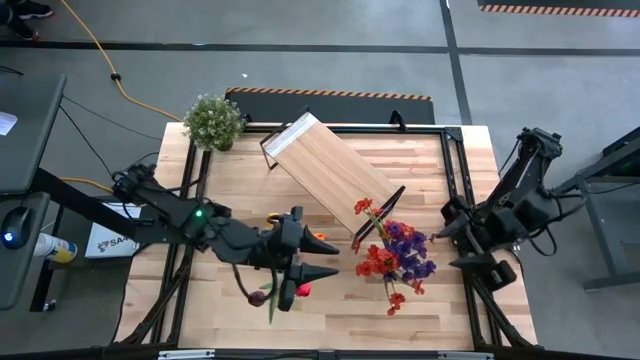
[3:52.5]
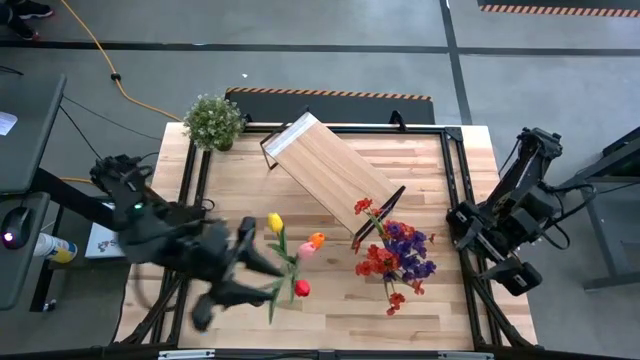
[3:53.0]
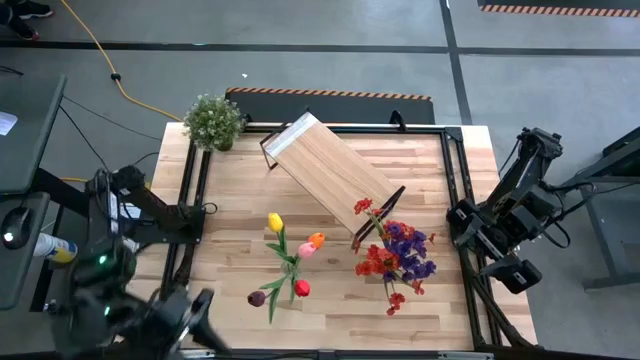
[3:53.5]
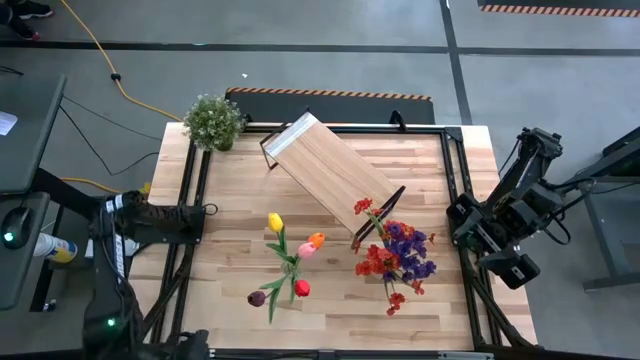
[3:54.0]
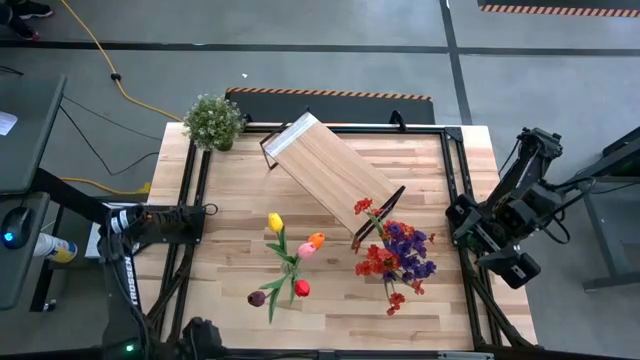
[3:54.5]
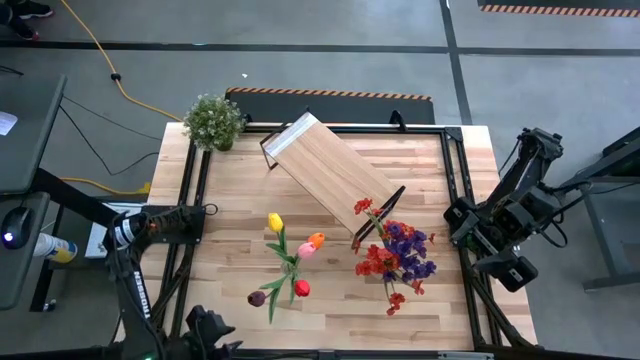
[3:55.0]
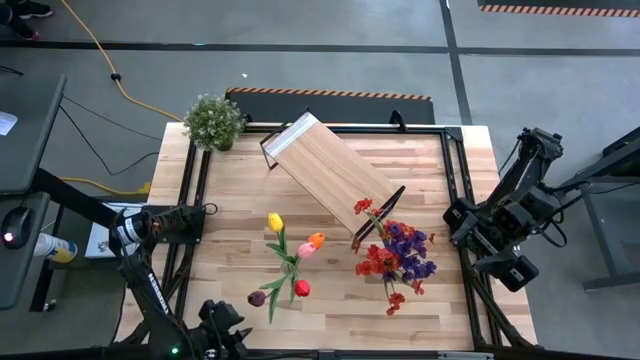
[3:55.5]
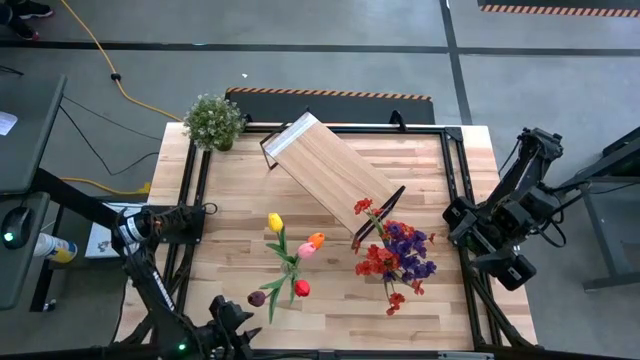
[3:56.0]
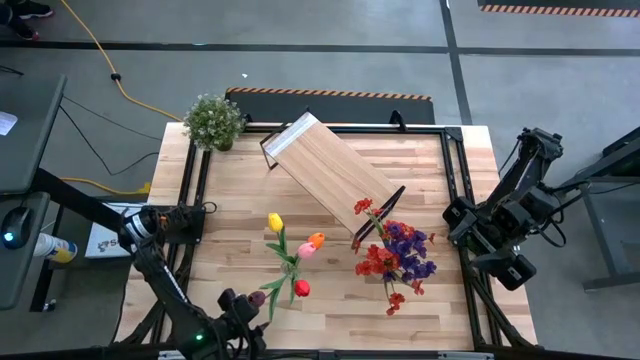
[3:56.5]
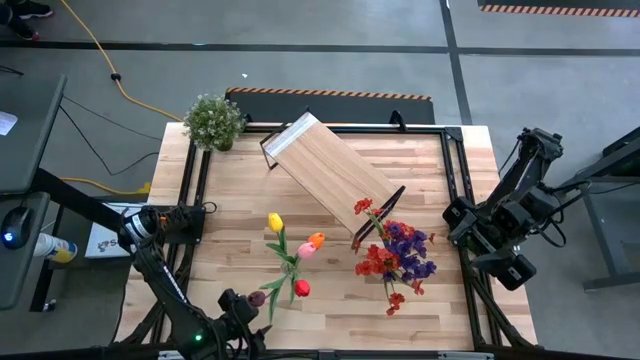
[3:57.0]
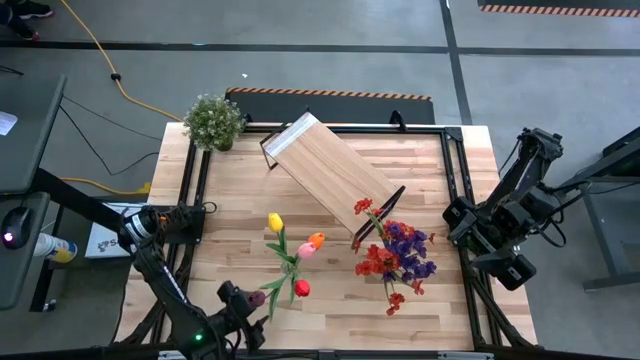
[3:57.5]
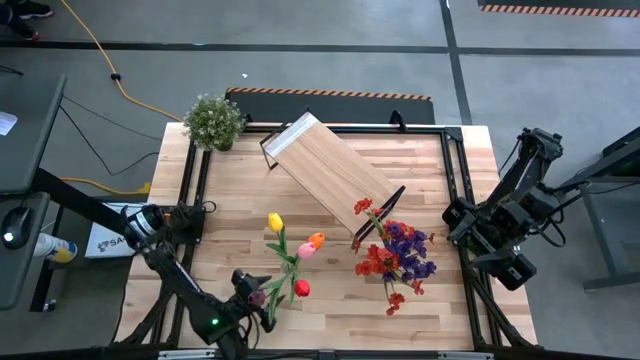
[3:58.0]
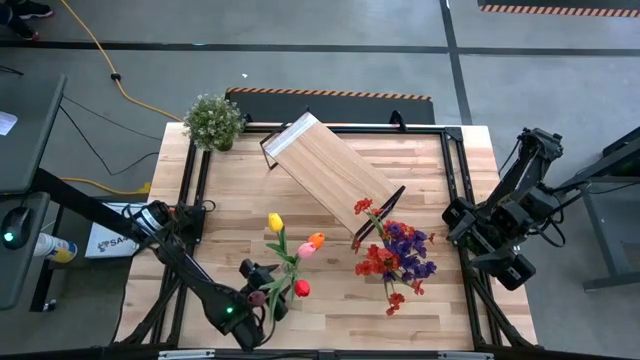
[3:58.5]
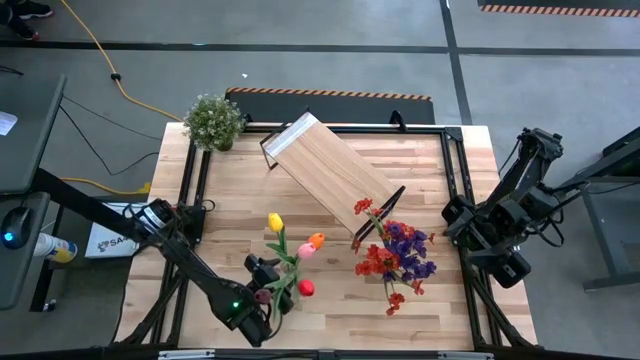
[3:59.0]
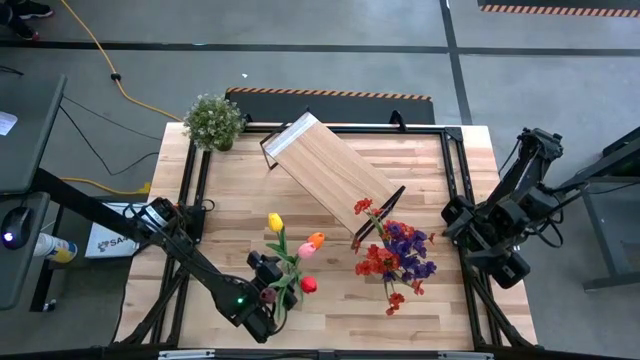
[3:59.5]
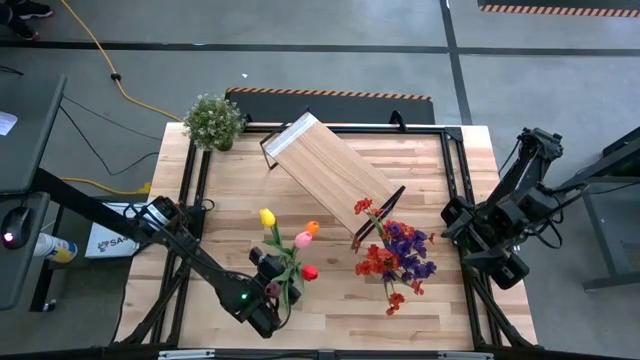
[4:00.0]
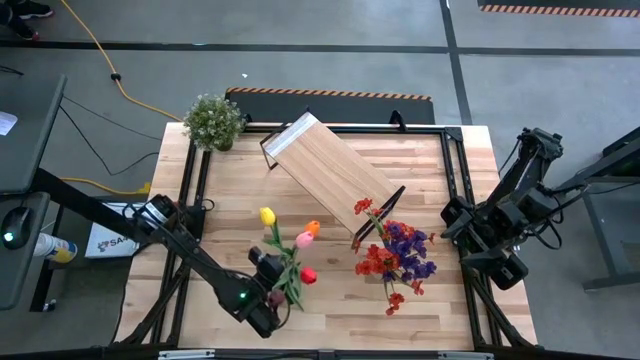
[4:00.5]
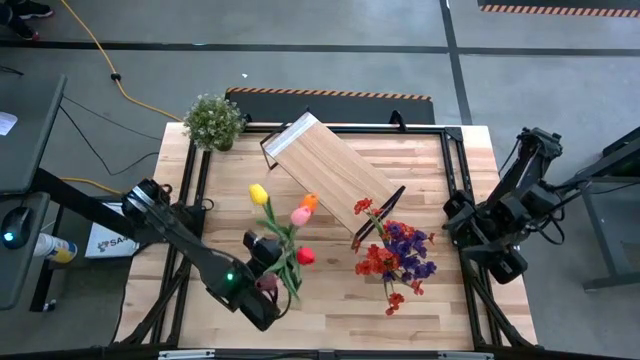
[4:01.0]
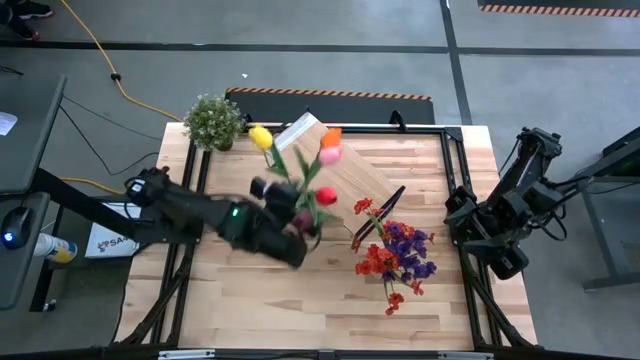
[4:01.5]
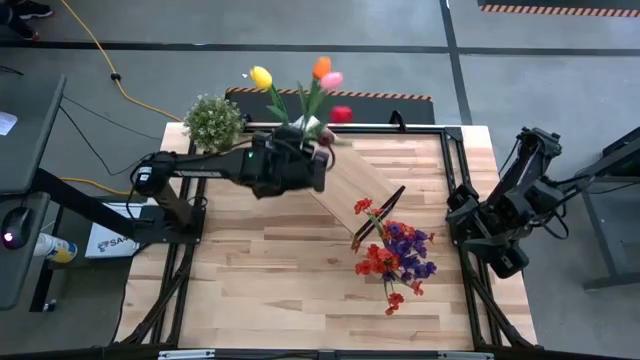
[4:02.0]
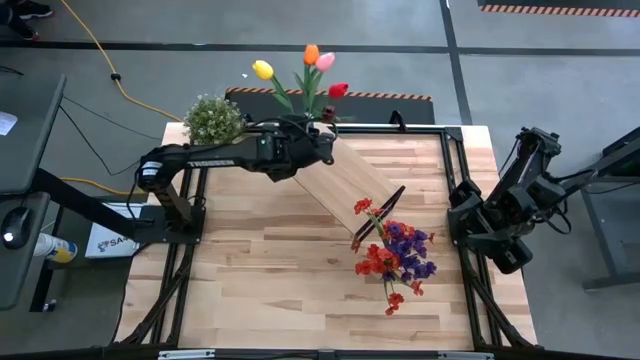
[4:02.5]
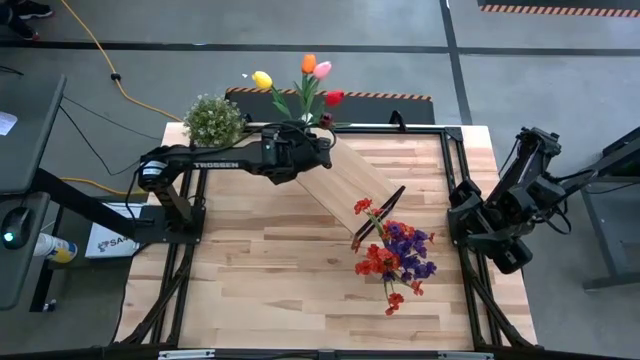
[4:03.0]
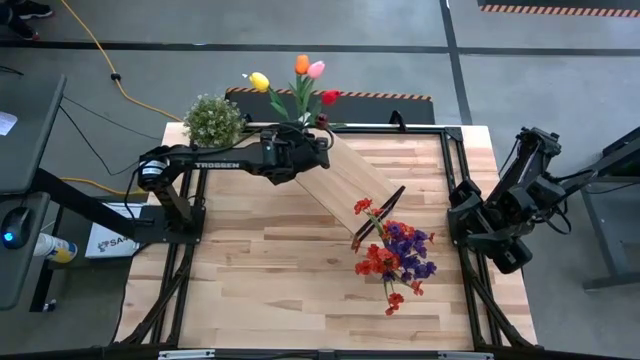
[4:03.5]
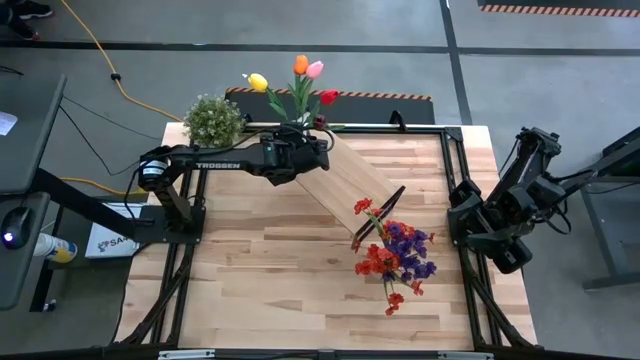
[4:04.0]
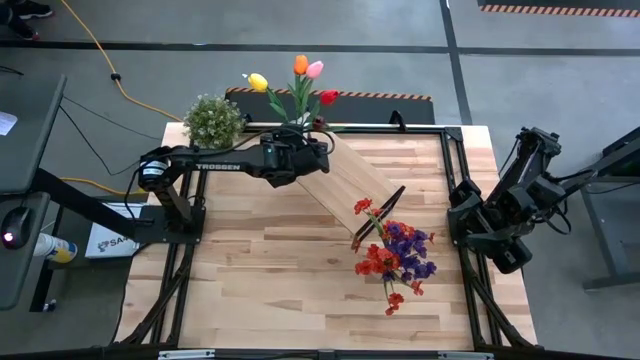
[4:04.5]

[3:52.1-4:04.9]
Task: Pick and place flowers into a vace then onto a shelf
Put the left transparent flower vase on the shelf

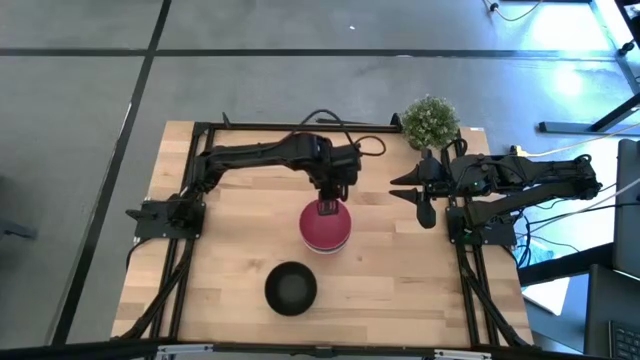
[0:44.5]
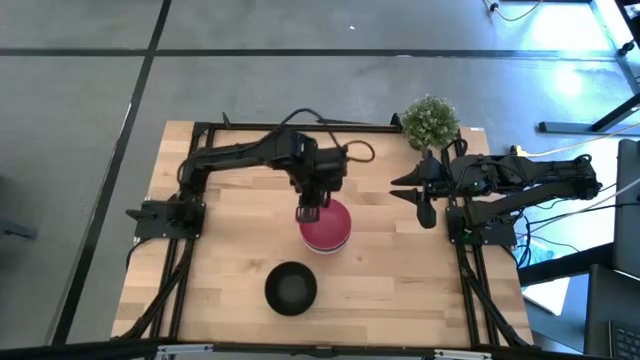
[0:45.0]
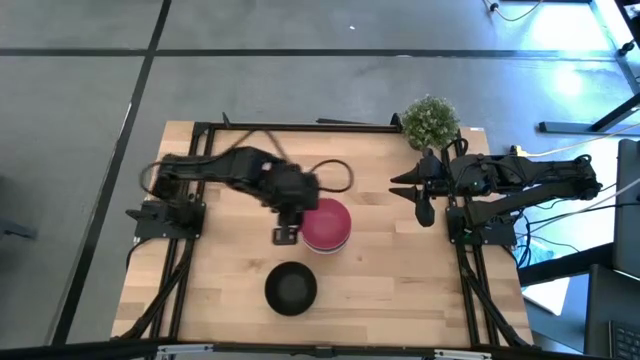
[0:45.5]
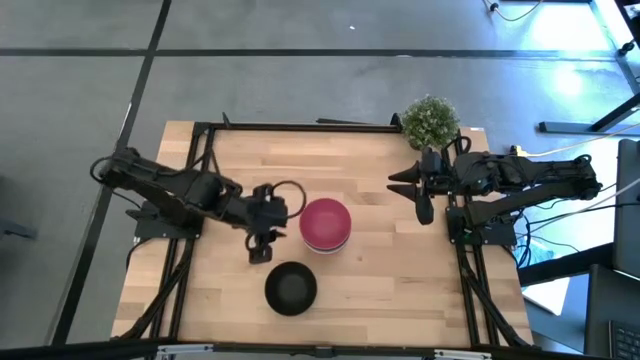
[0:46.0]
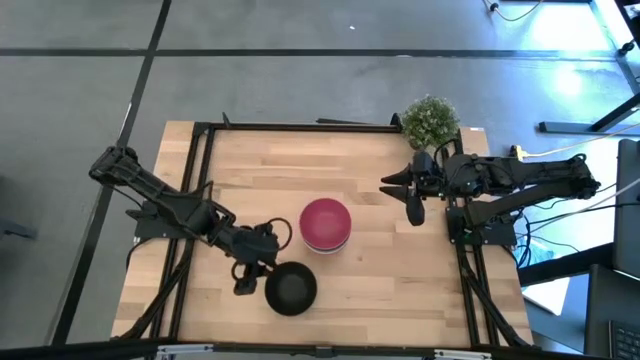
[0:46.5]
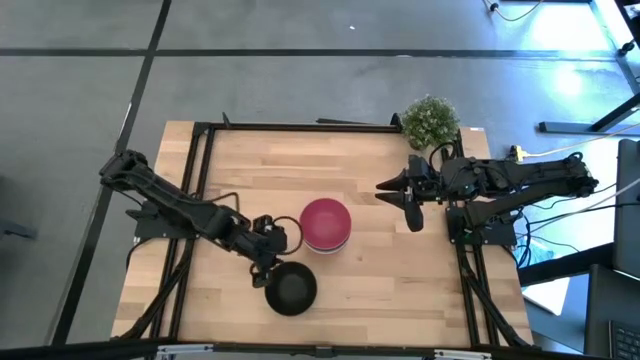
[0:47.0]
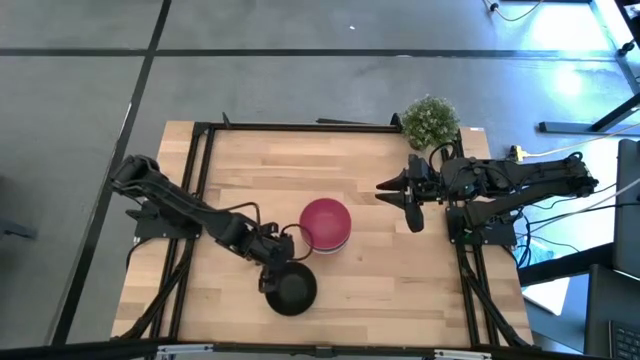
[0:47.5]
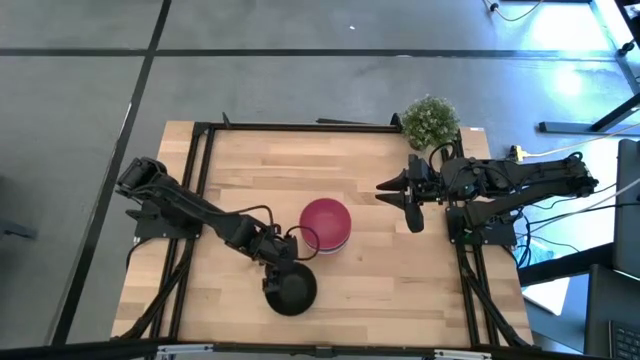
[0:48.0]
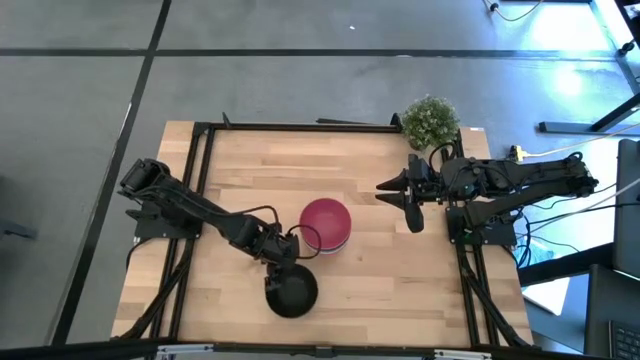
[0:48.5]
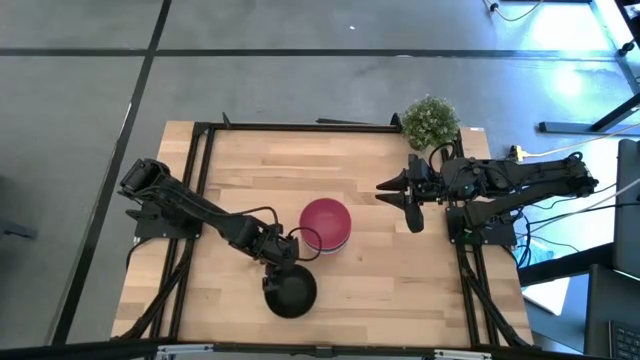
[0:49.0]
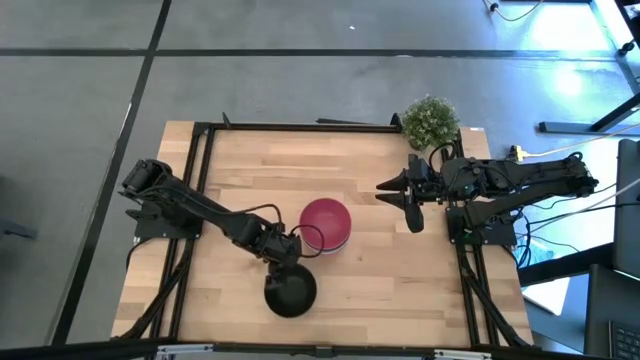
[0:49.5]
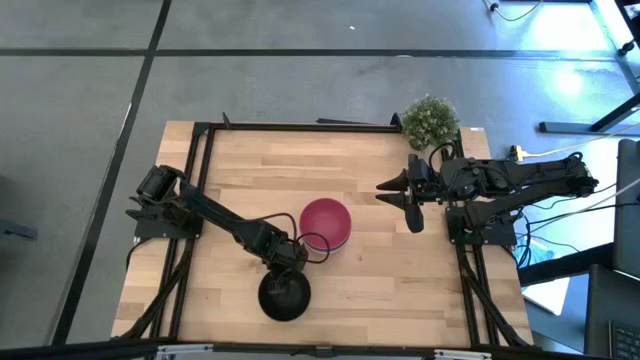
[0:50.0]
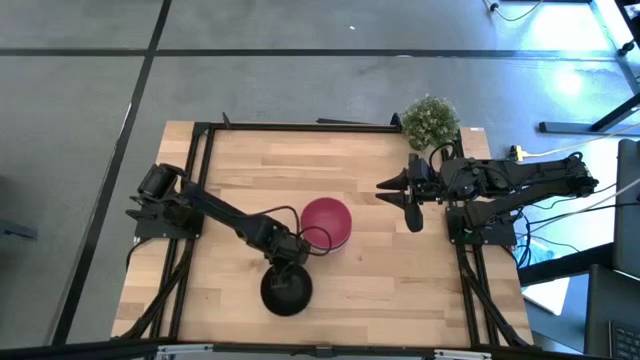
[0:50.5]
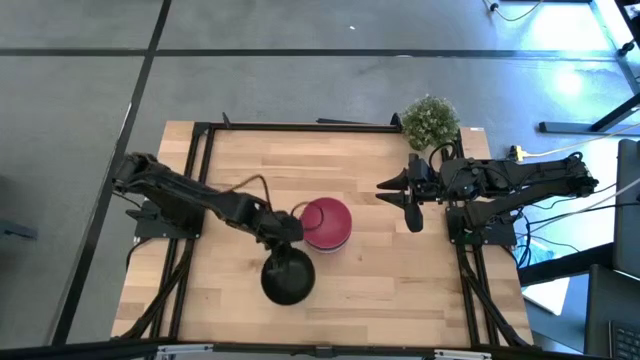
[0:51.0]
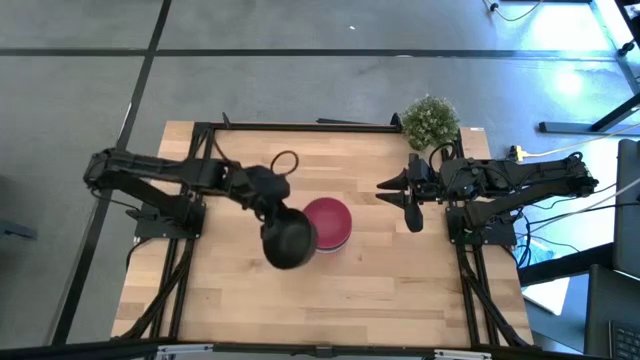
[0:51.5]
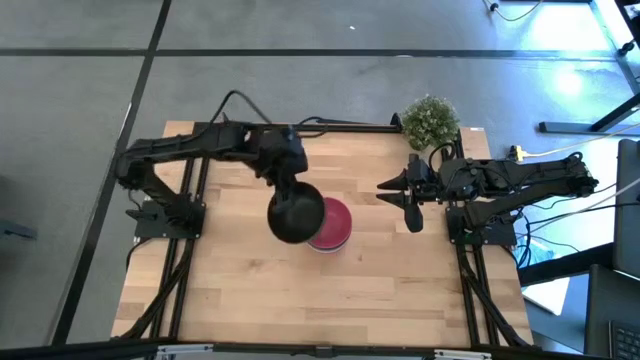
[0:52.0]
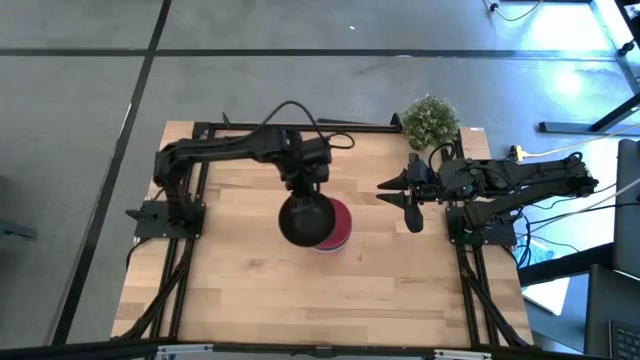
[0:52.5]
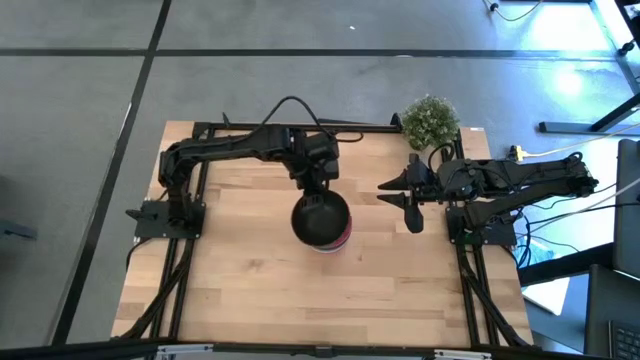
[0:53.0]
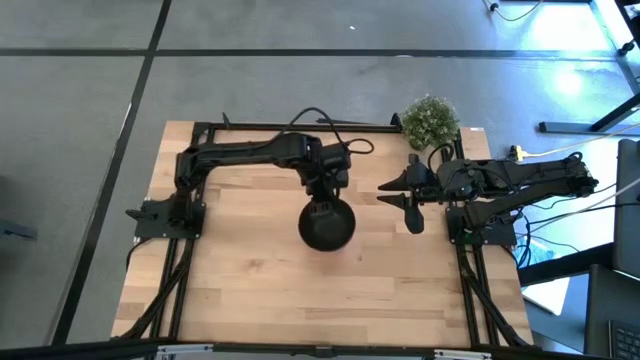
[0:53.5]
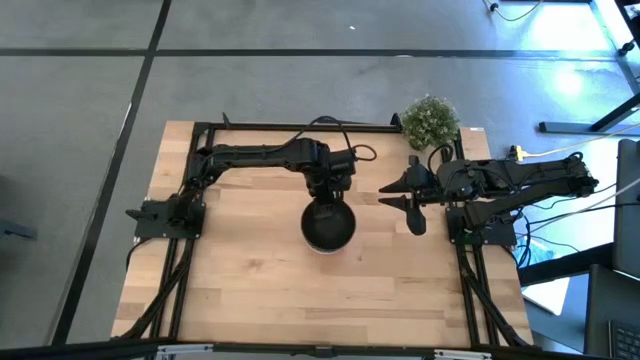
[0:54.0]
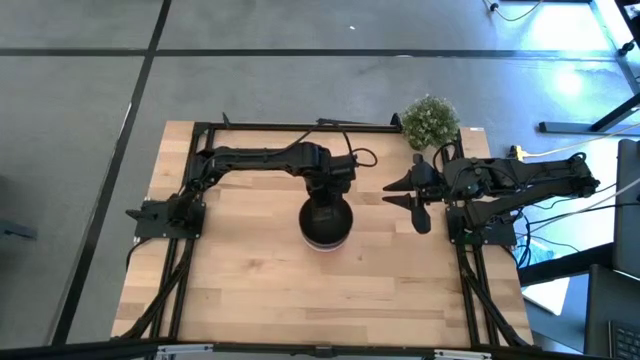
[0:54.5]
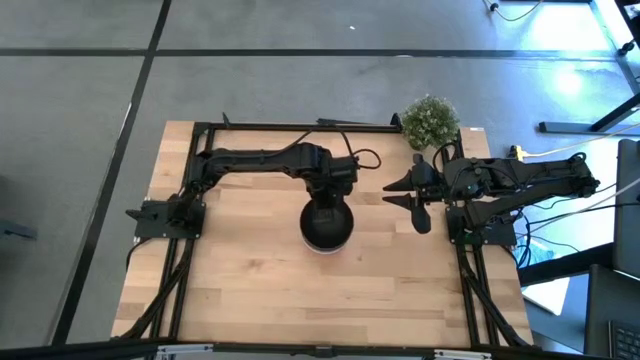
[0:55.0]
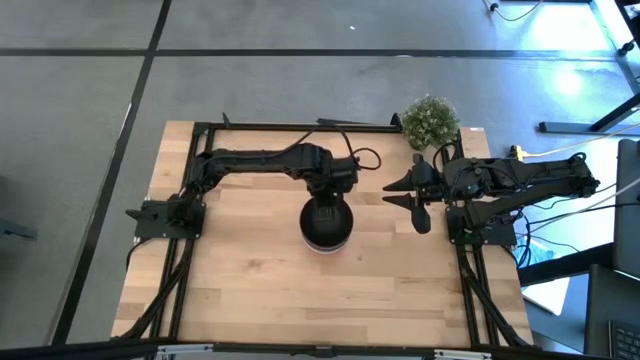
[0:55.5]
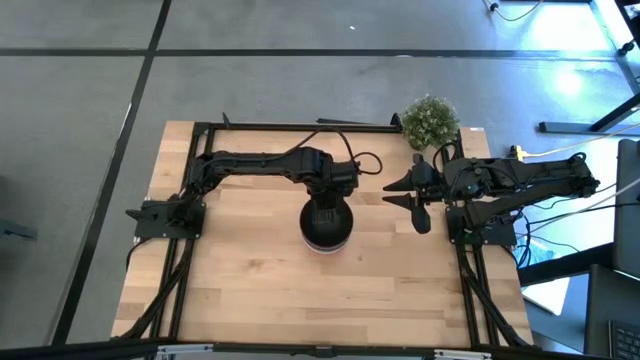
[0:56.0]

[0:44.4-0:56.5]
Task: Nest bowls inside each other
Stack the black bowl on top of the pink bowl
